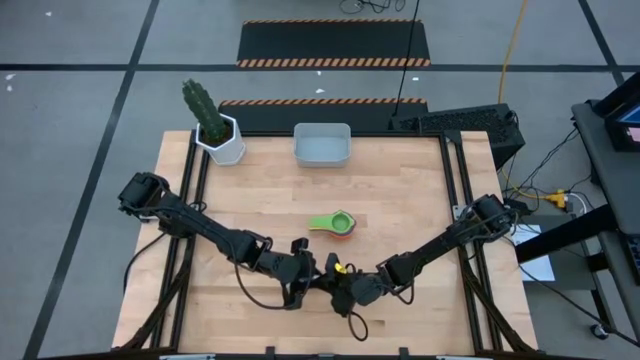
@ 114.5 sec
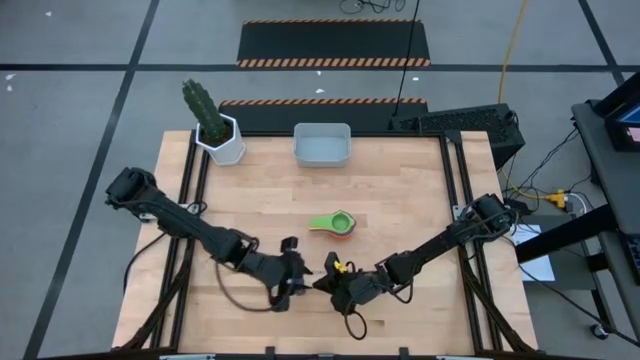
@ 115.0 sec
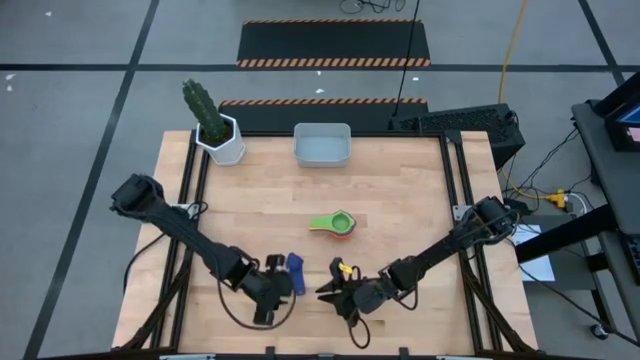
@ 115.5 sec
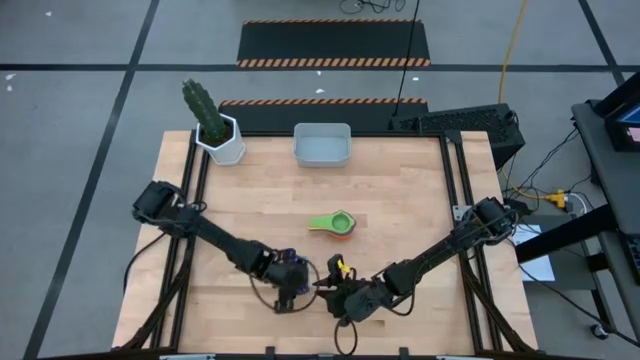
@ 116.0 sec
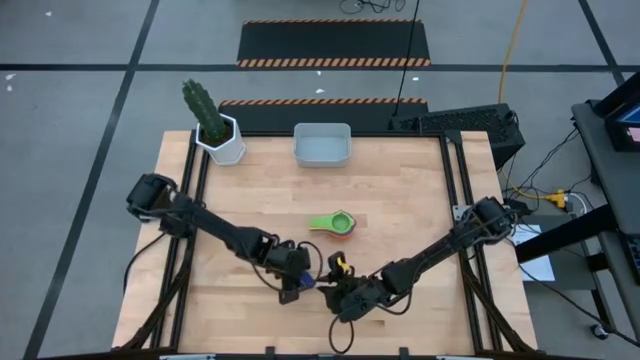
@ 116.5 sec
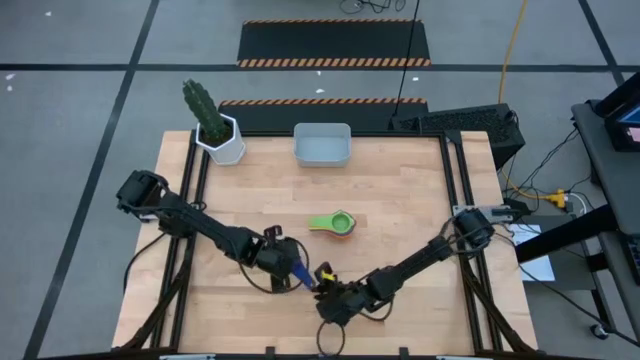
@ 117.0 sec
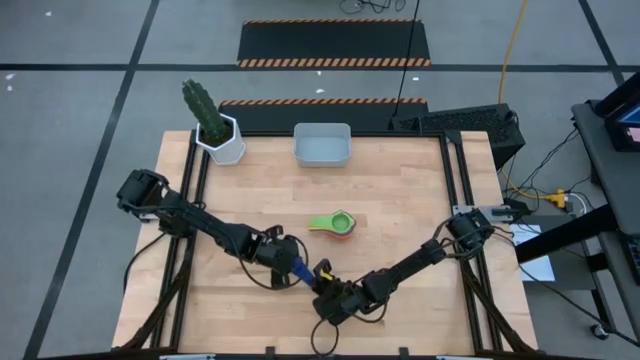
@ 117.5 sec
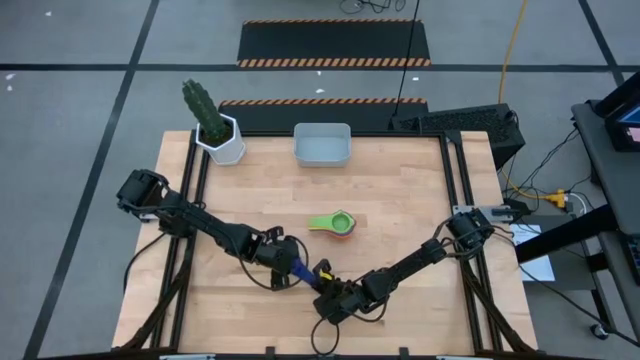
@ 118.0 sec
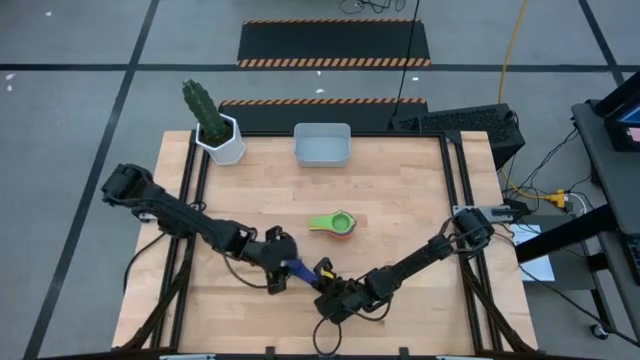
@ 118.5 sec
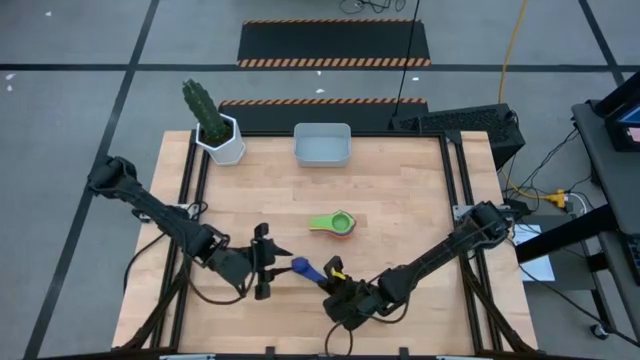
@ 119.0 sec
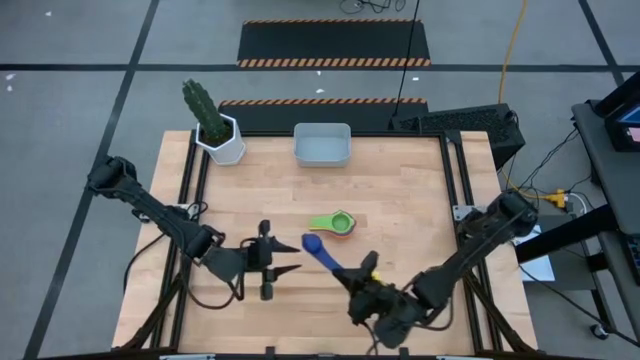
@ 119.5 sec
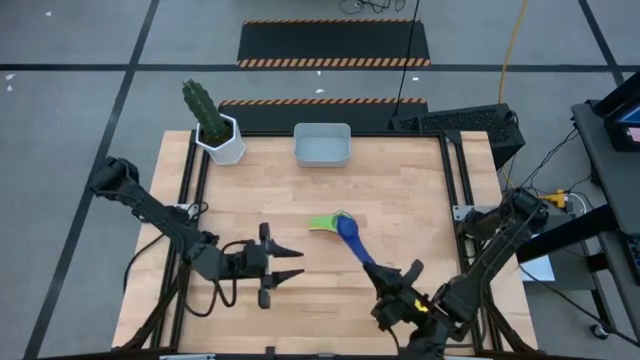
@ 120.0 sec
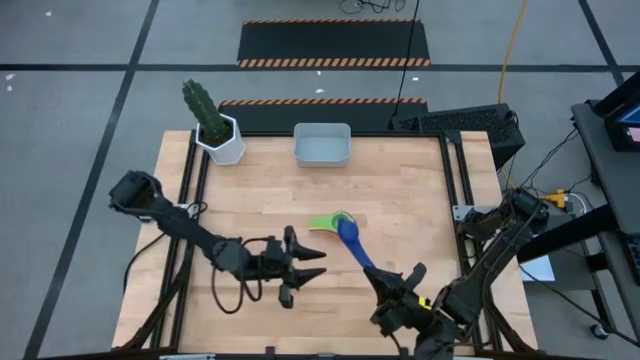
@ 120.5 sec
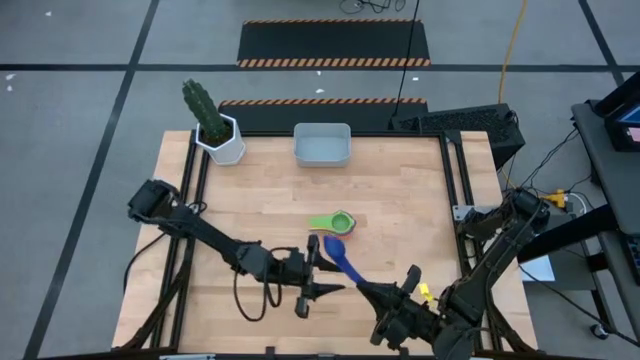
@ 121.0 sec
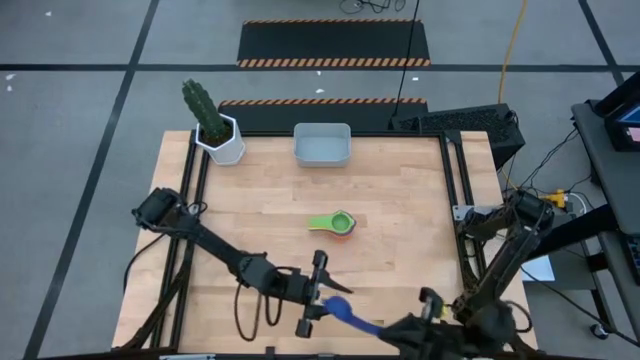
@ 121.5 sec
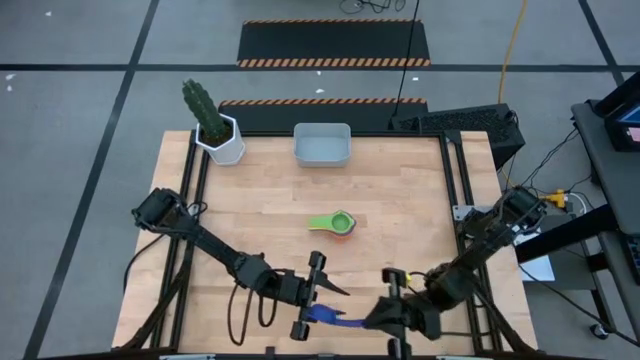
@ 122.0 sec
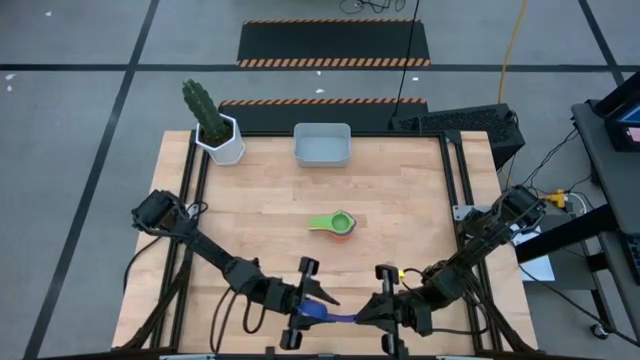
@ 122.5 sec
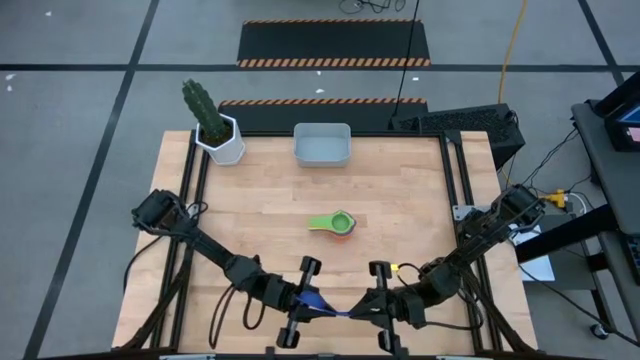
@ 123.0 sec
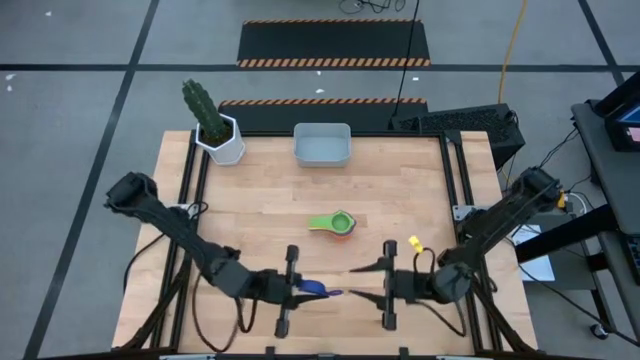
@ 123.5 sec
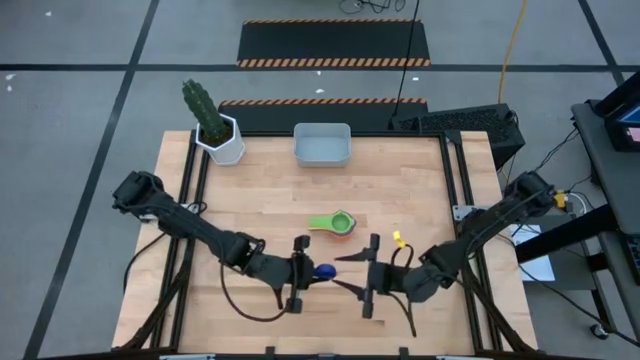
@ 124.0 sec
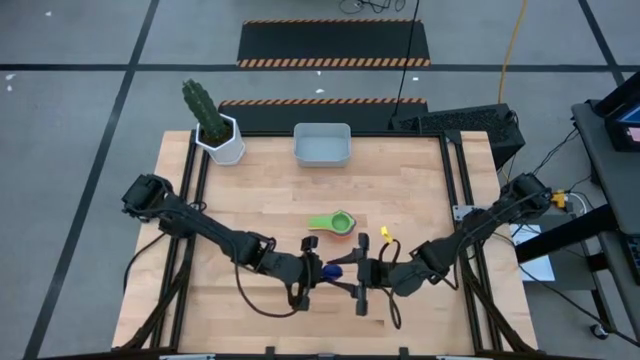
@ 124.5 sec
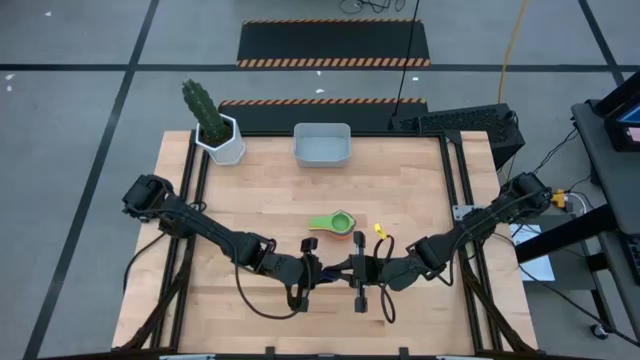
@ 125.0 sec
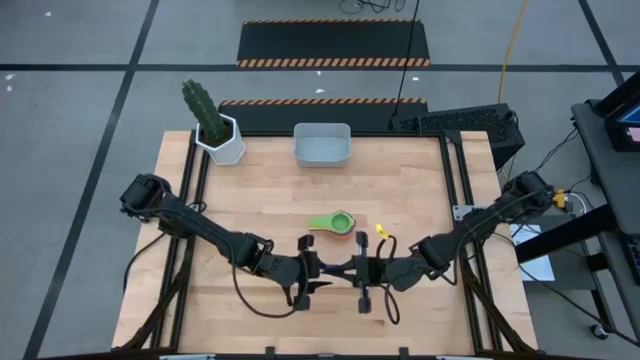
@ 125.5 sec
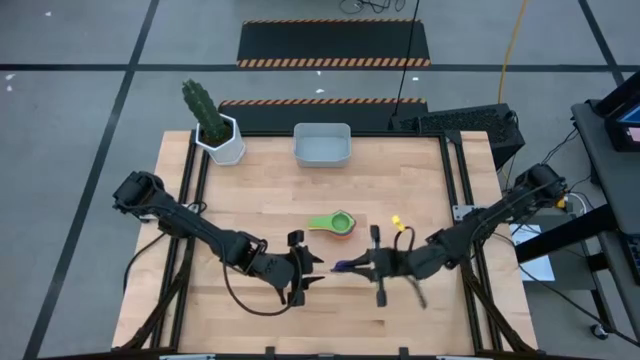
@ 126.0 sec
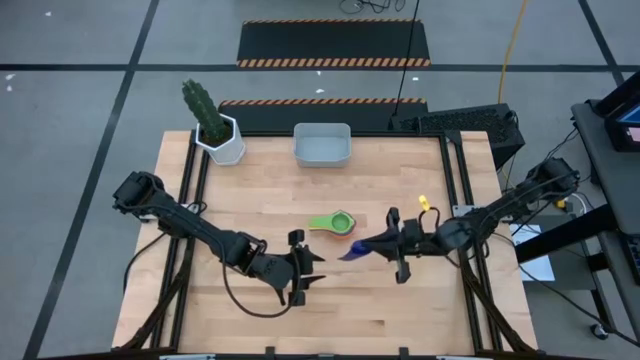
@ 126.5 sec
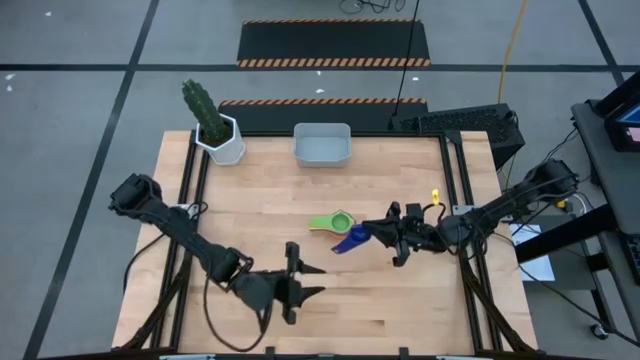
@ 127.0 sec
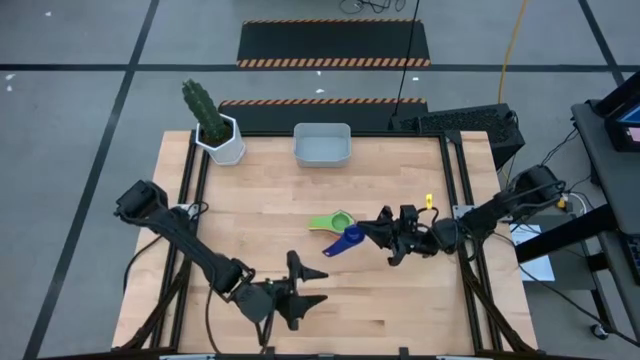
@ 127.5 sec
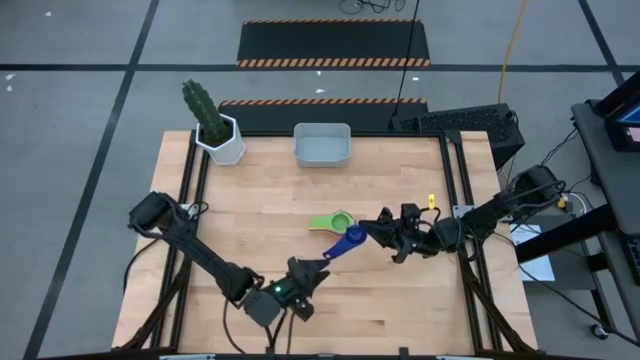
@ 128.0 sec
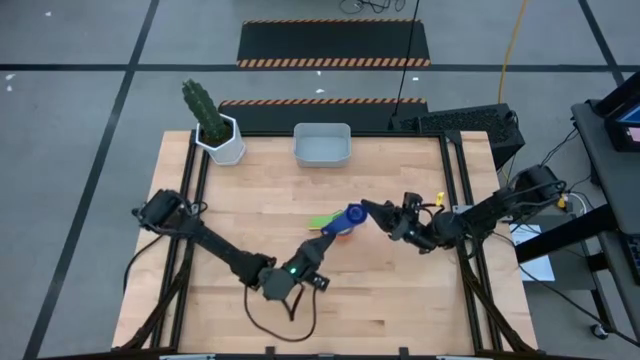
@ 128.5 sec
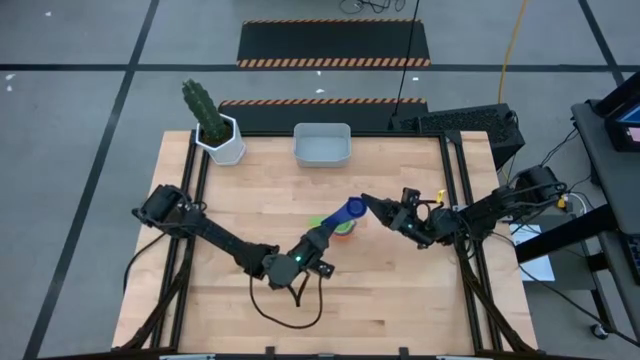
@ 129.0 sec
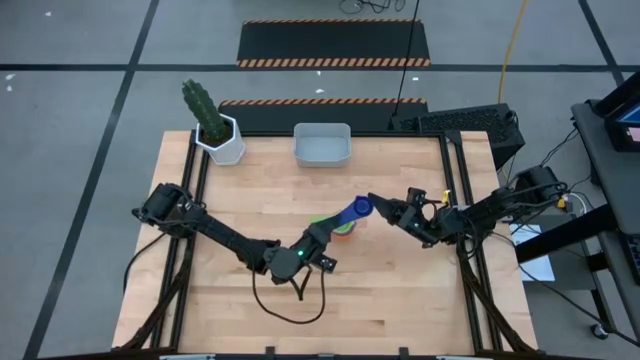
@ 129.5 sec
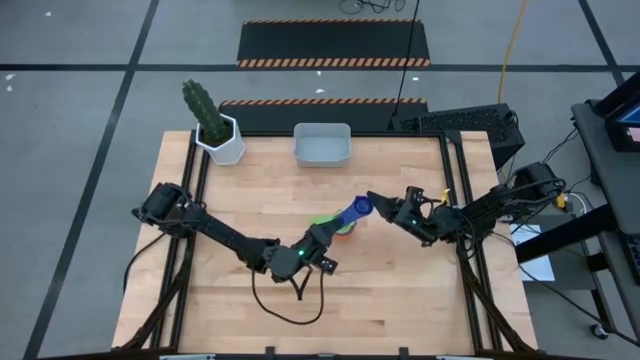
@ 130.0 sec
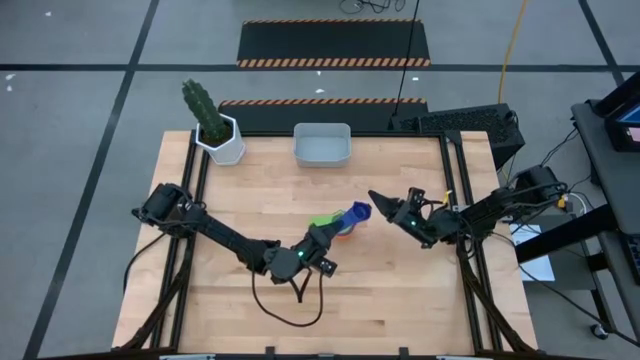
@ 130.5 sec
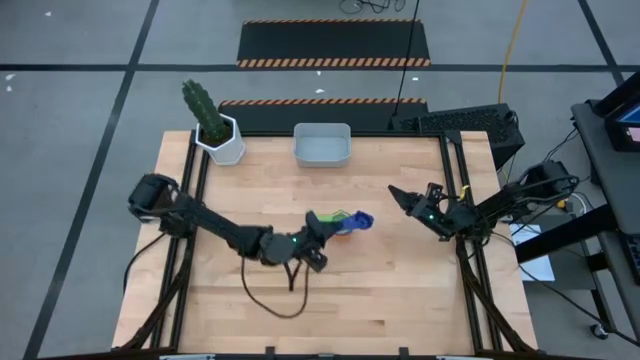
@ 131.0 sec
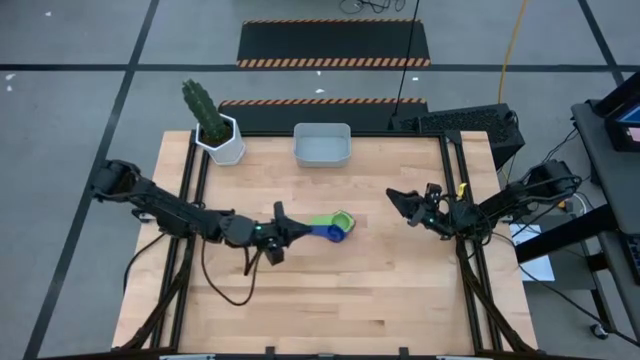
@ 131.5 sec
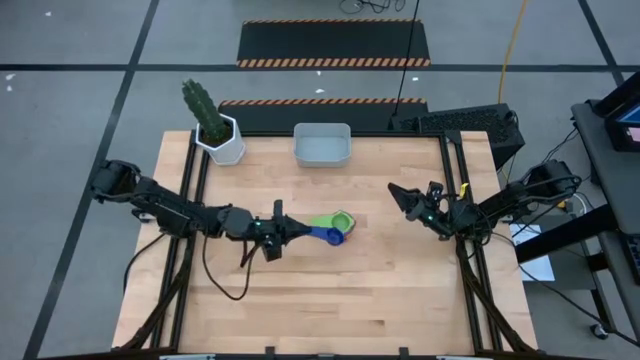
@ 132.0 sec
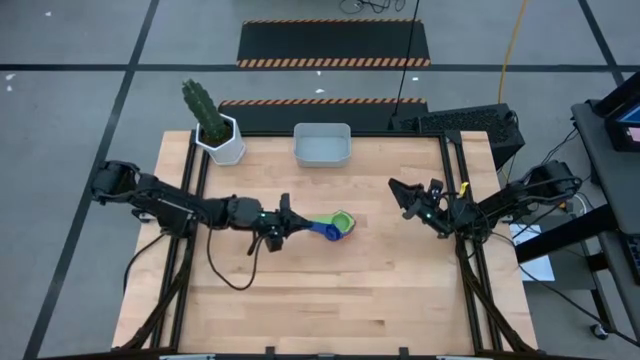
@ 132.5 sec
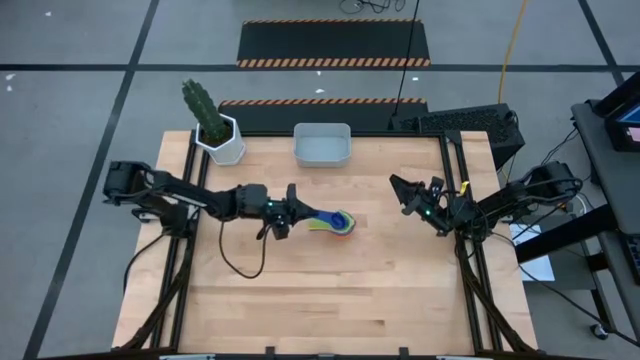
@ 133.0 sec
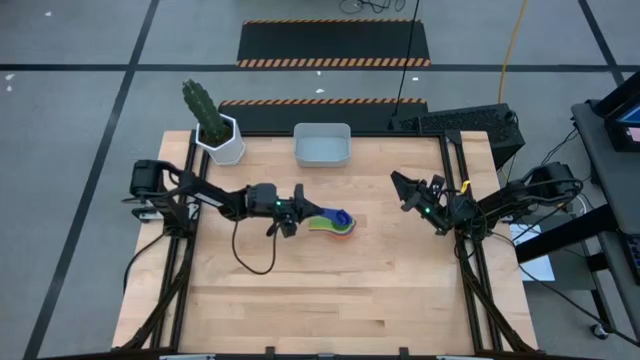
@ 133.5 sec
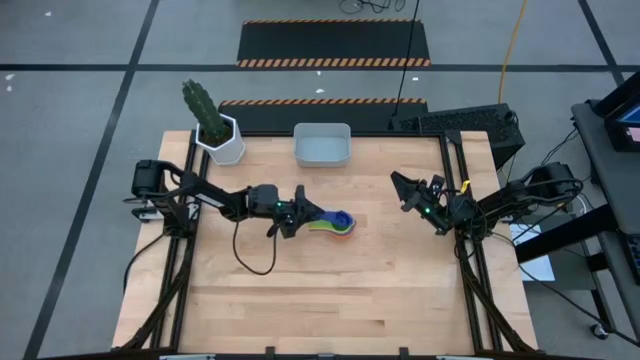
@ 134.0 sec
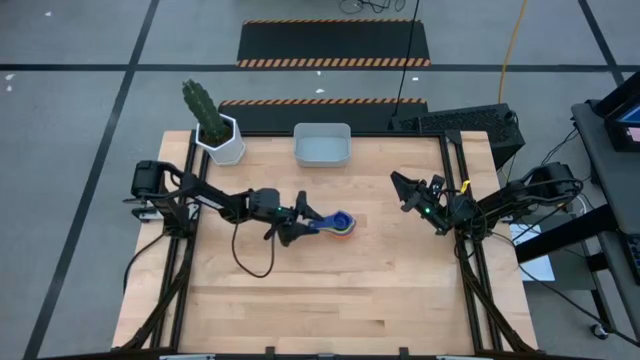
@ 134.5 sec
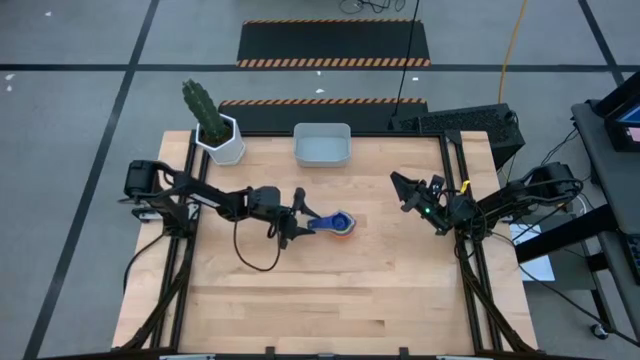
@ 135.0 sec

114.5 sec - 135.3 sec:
Task: Nest measuring cups in basket
Stack the violet measuring cup on top of the green measuring cup
